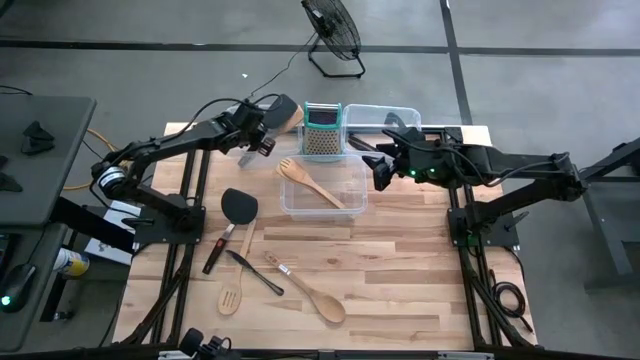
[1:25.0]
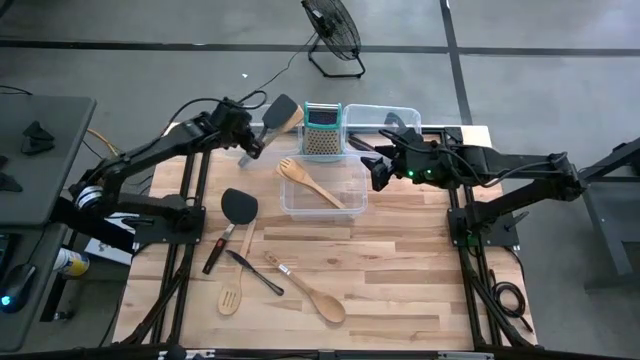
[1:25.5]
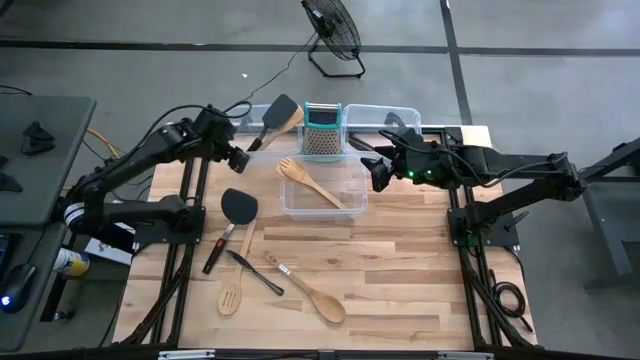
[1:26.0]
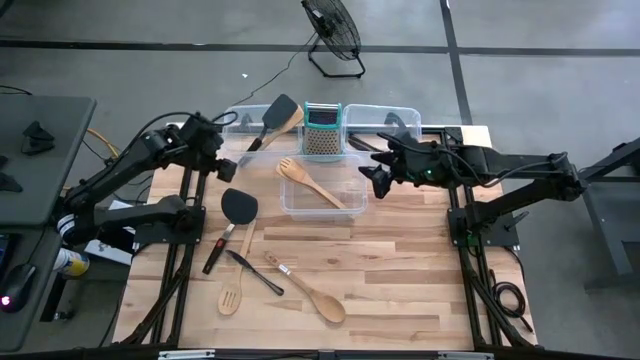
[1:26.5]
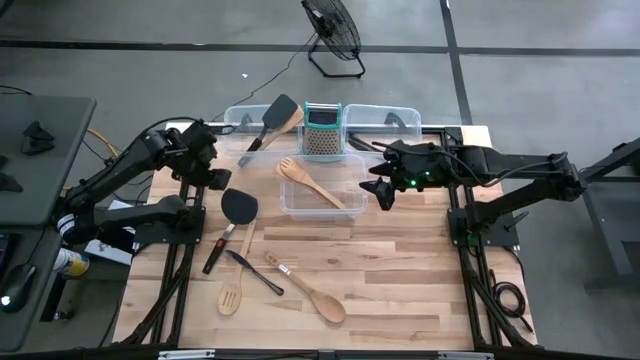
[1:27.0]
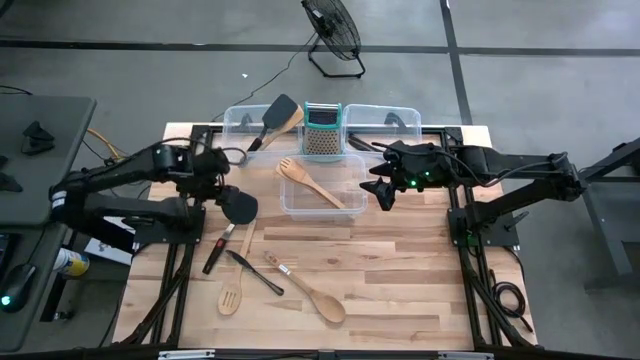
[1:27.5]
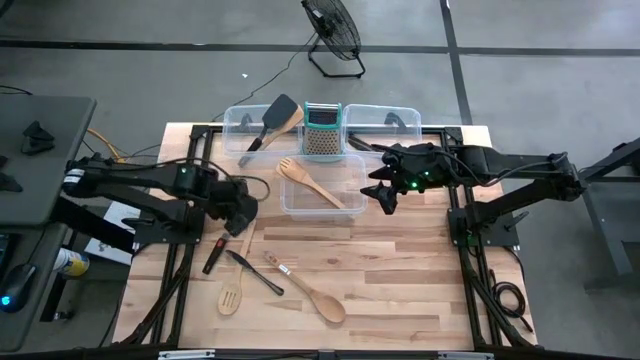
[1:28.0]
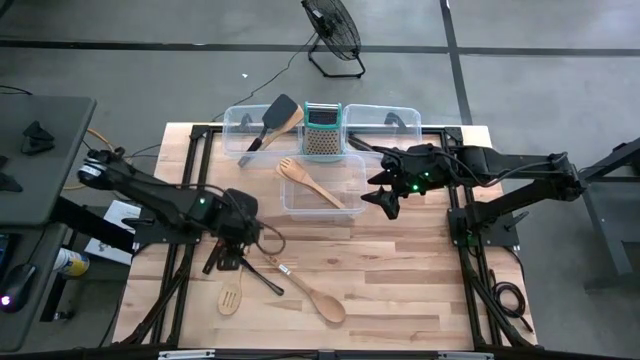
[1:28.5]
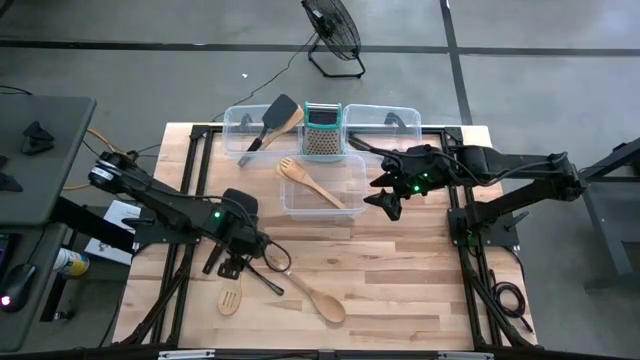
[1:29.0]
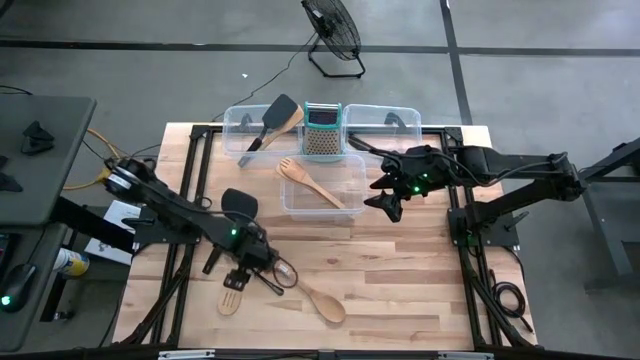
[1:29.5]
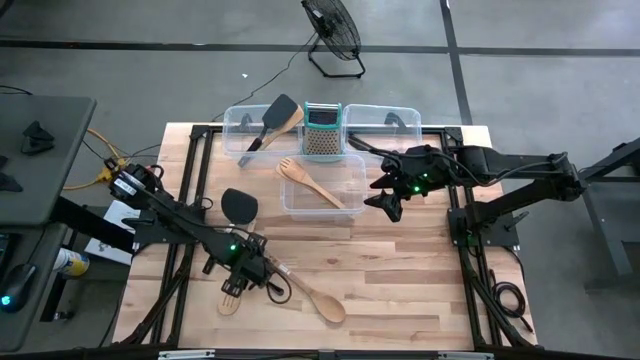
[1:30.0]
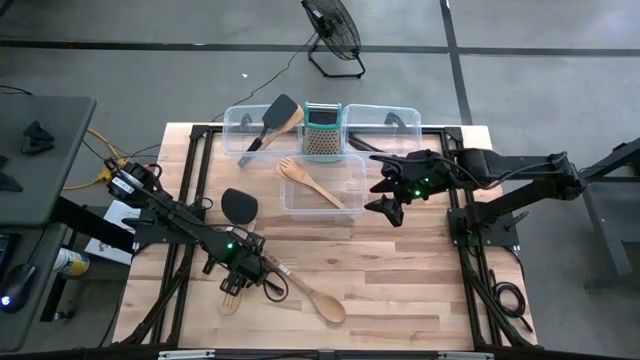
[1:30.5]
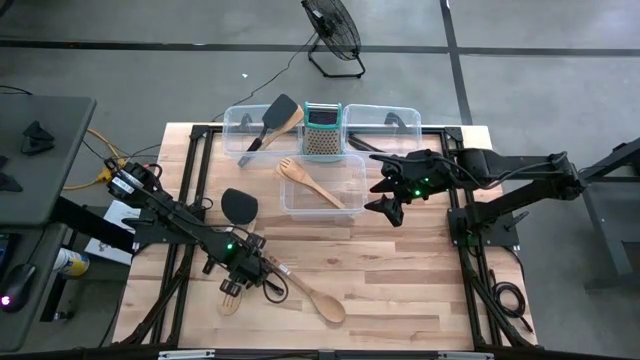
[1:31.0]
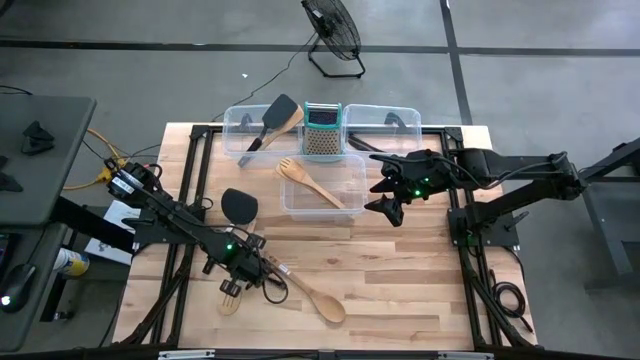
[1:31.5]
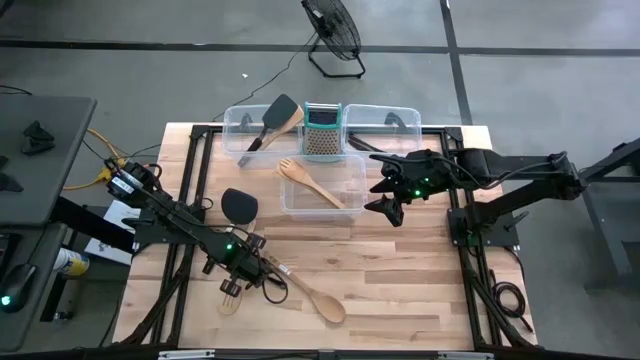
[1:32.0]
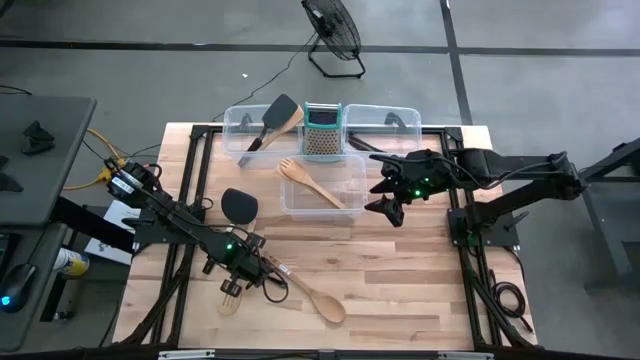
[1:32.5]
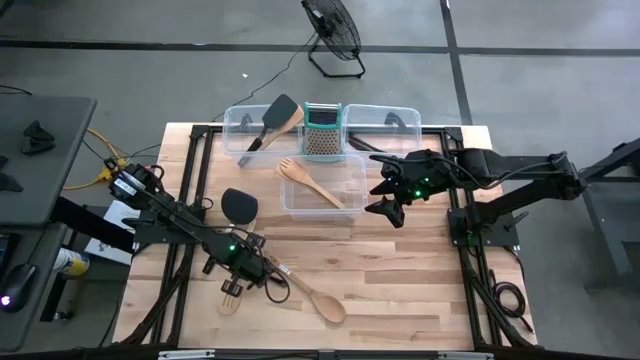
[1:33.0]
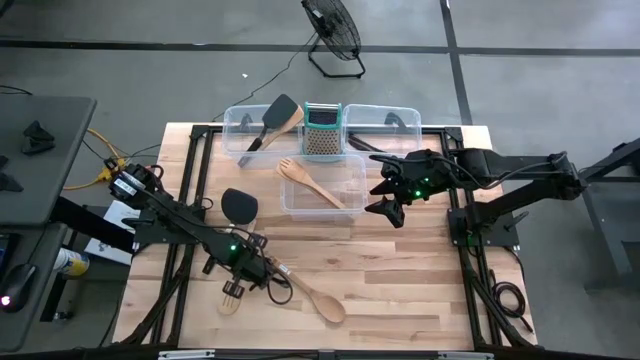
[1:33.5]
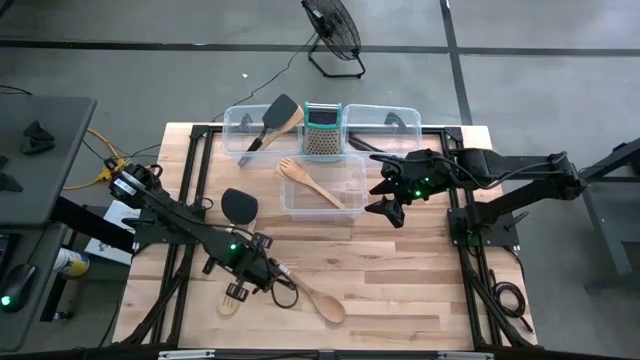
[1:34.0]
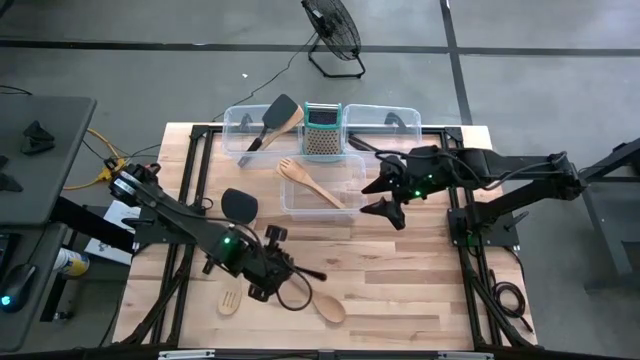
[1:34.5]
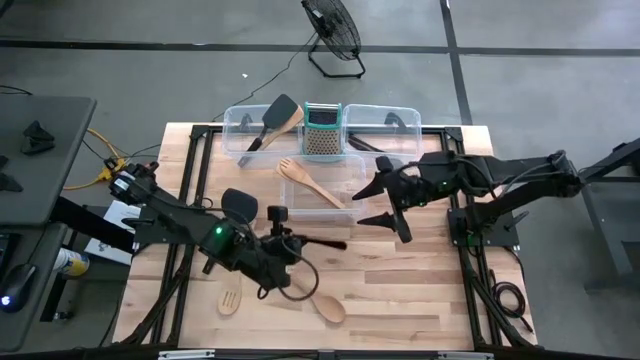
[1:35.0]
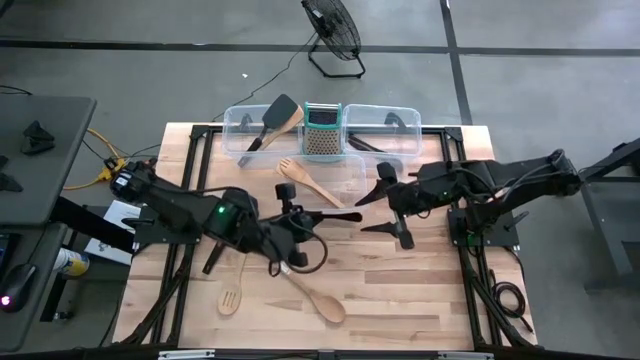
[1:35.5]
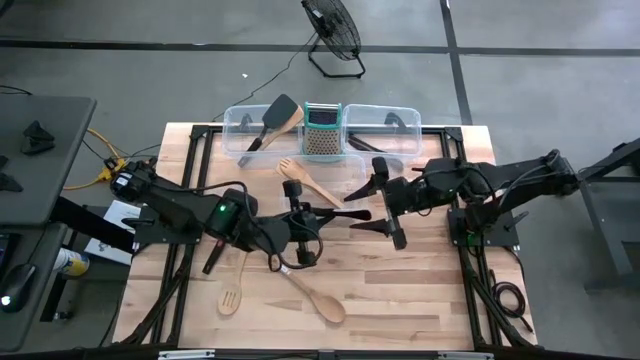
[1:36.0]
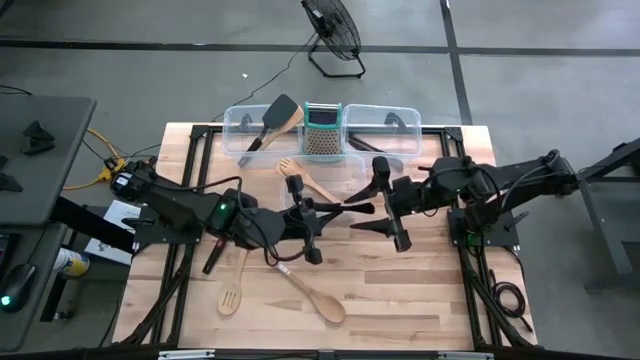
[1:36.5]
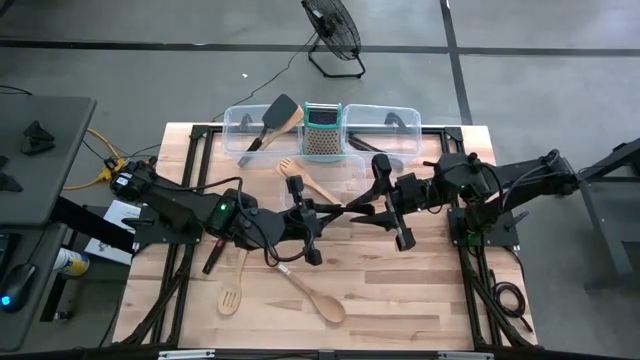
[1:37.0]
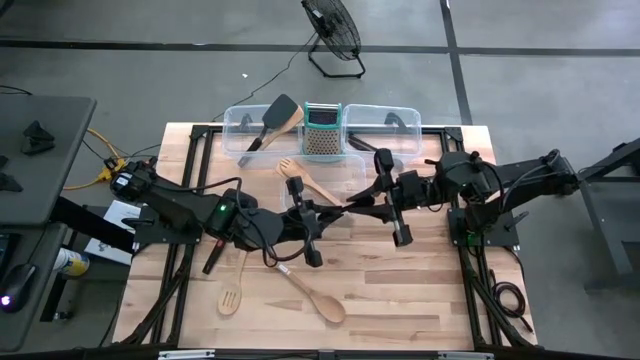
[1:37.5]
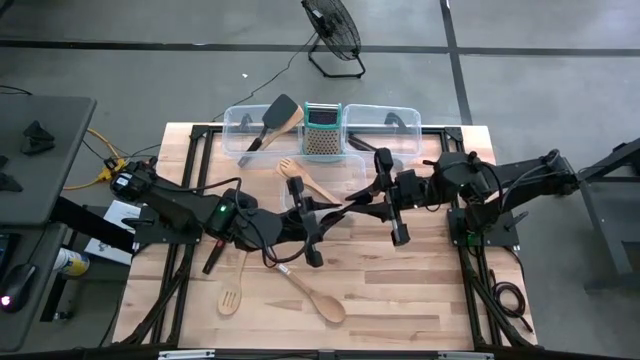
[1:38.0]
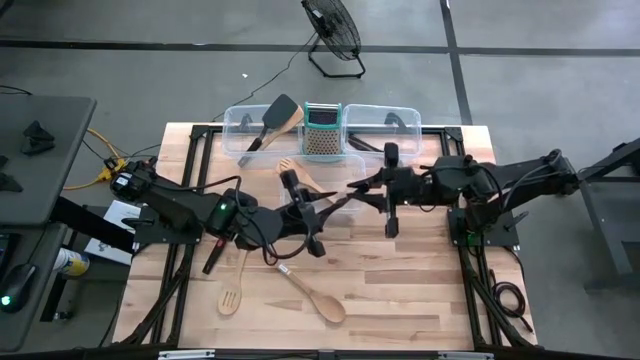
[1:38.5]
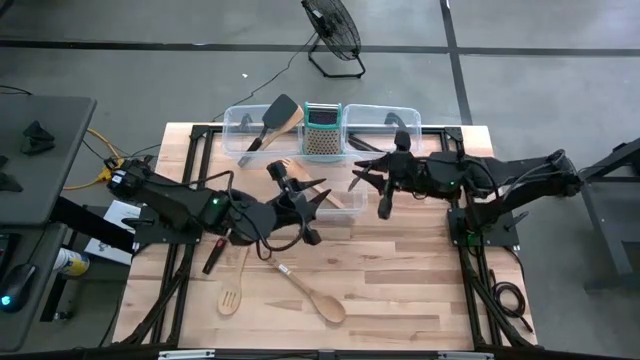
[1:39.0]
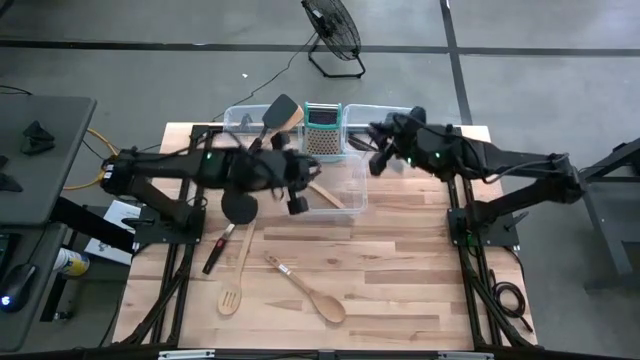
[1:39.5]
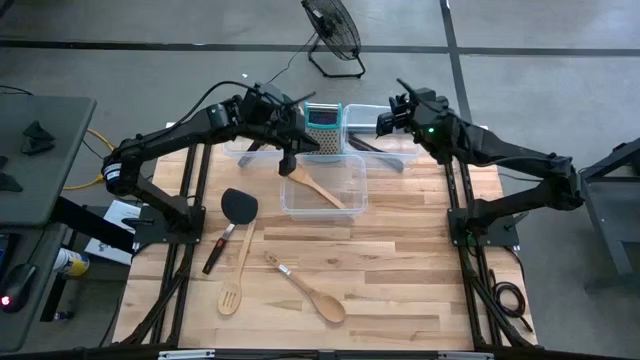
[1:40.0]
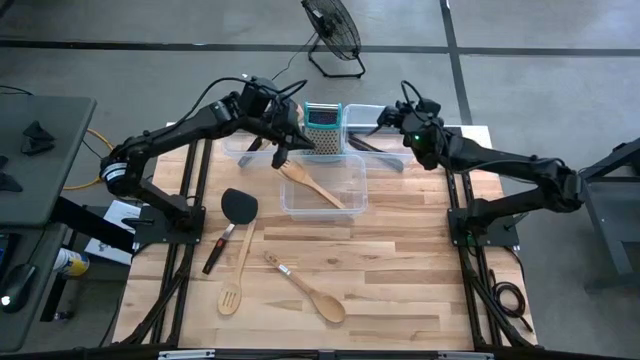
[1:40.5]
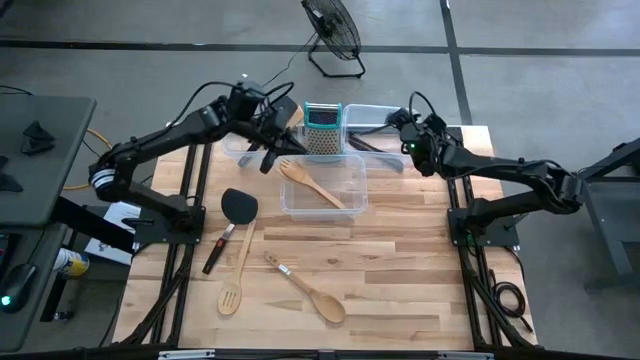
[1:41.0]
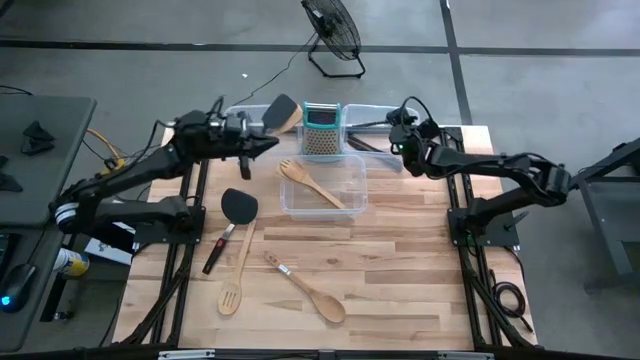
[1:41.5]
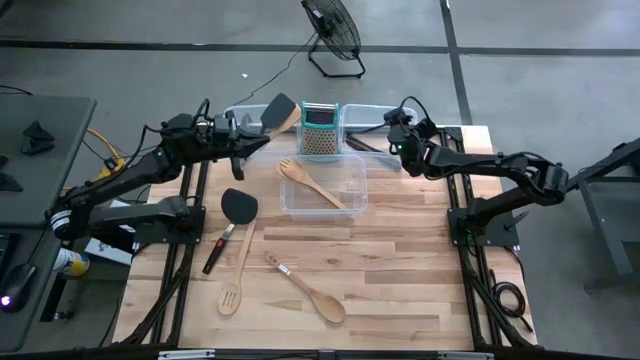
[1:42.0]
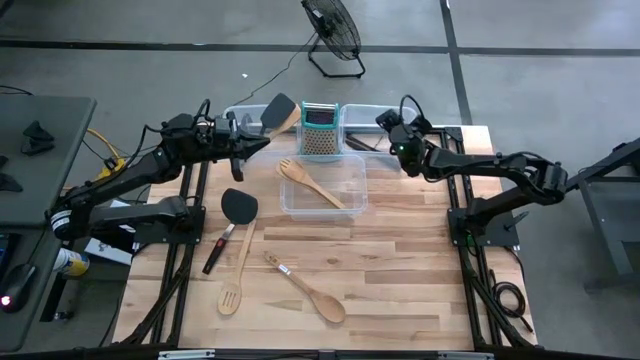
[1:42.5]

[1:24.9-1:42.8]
Task: Pick & Place Kitchen Items
Put the black knife into the right transparent bin

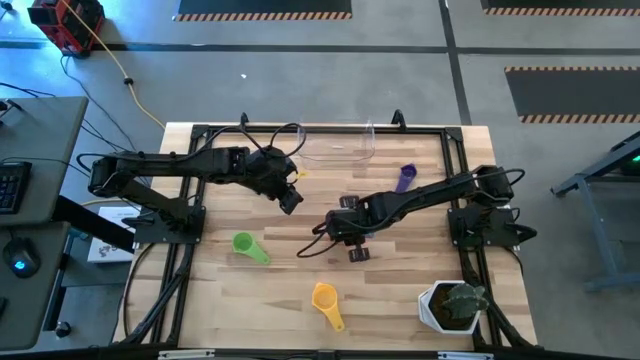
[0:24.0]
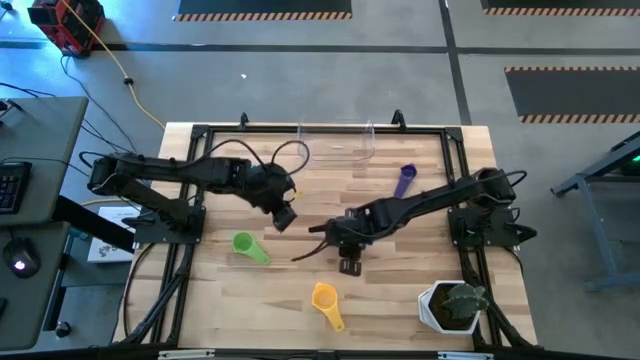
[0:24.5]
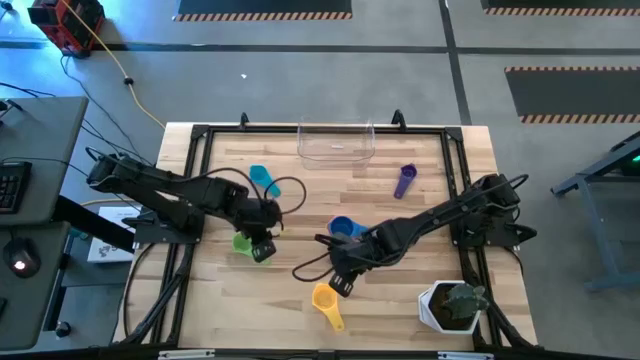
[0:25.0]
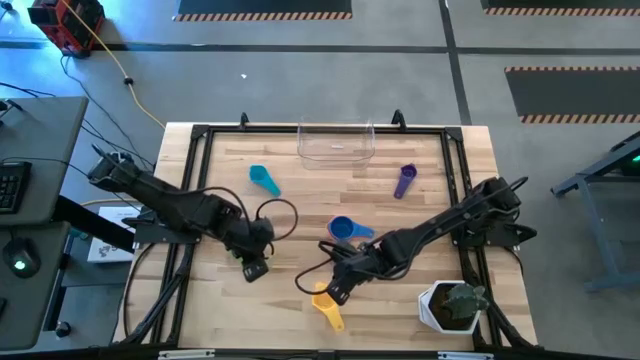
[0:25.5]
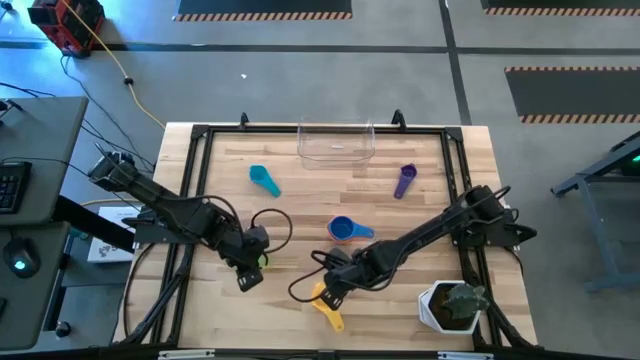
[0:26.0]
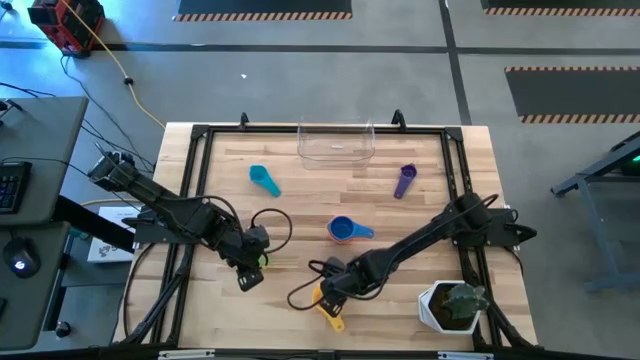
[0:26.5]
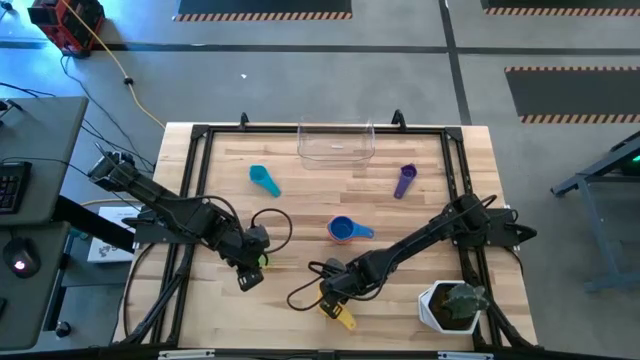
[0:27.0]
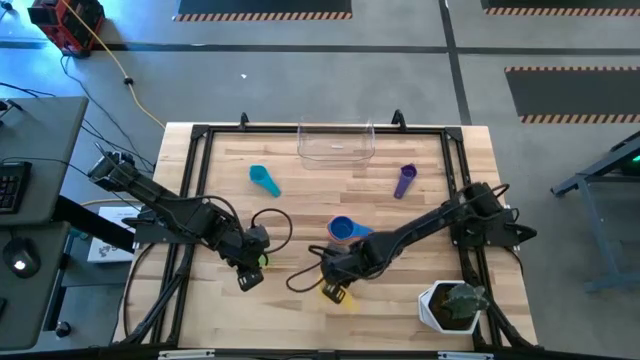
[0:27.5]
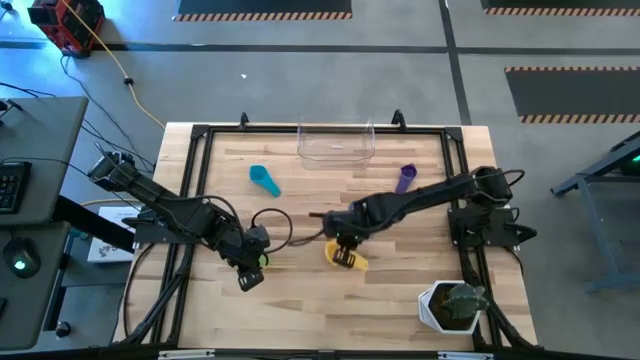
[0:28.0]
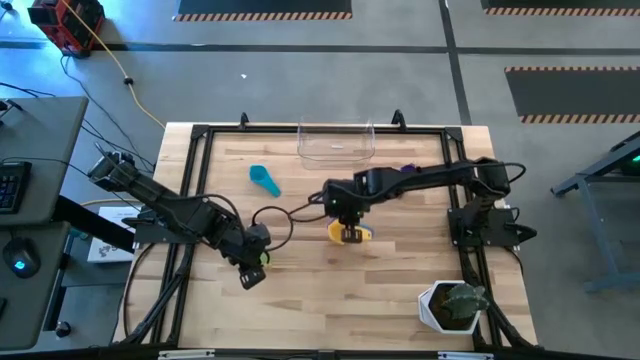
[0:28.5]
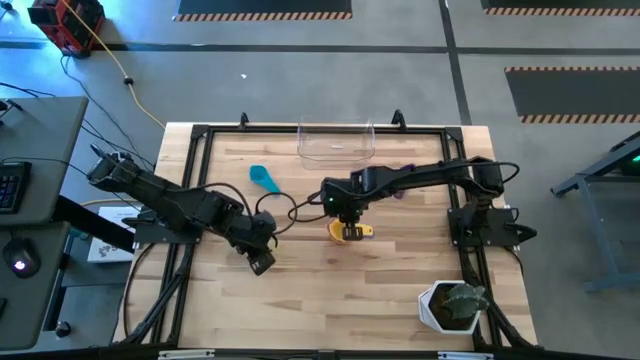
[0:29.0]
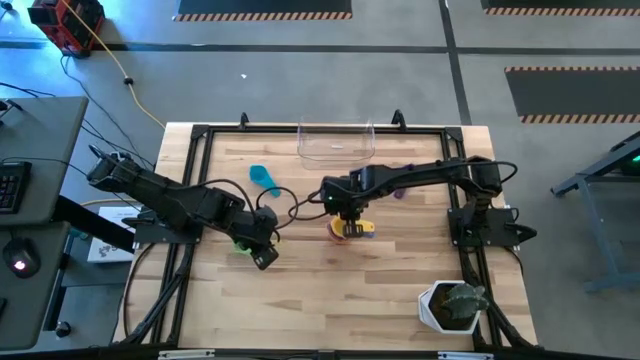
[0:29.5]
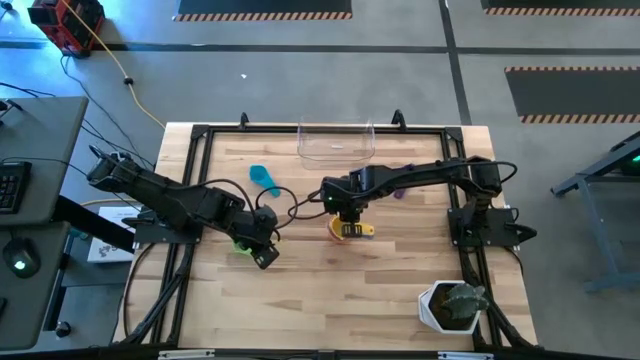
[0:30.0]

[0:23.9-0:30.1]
Task: Nest measuring cups in basket
Stack the yellow measuring cup on top of the blue measuring cup
